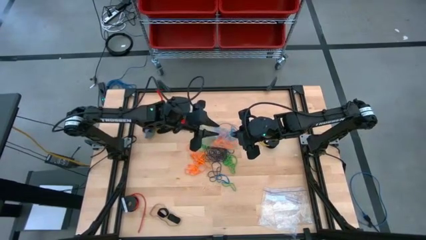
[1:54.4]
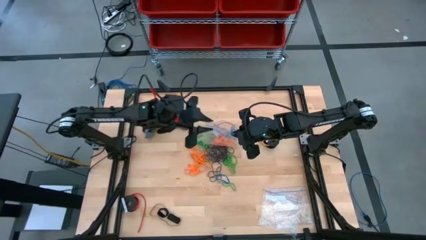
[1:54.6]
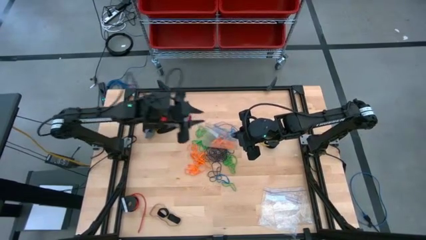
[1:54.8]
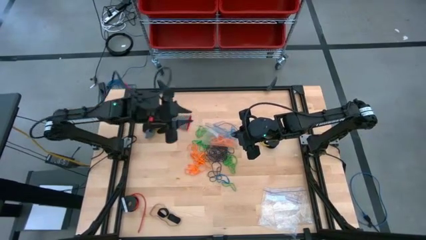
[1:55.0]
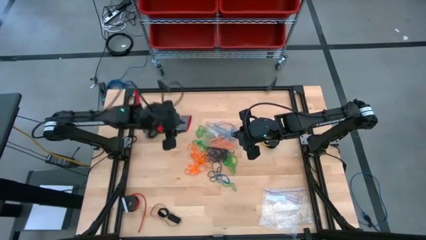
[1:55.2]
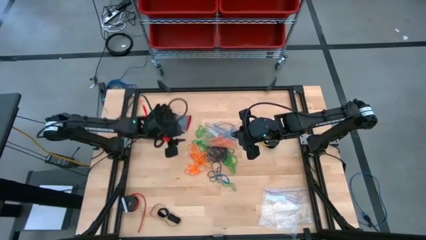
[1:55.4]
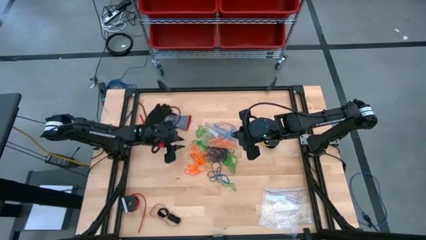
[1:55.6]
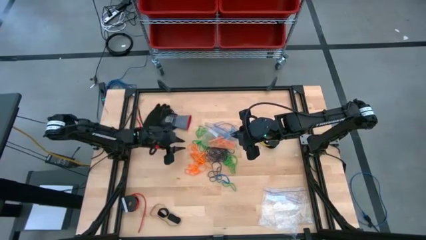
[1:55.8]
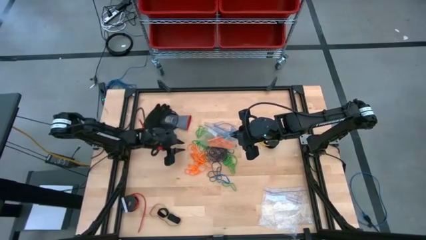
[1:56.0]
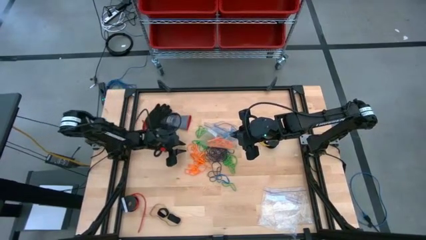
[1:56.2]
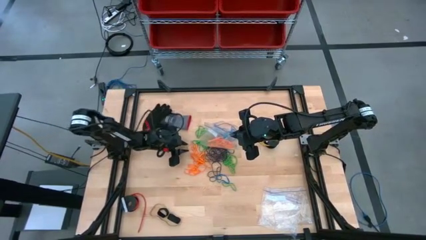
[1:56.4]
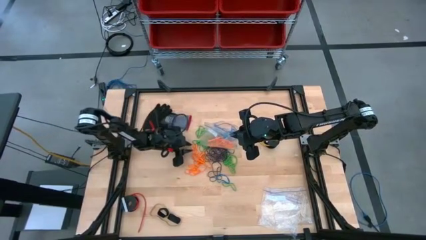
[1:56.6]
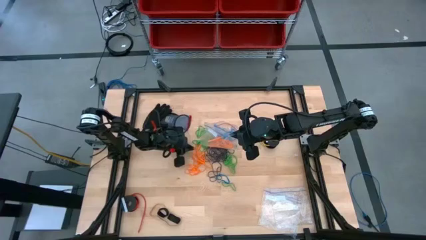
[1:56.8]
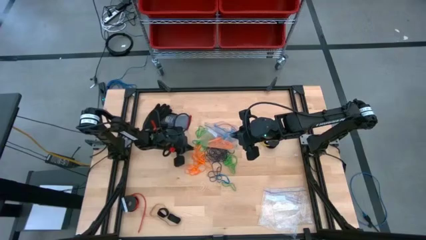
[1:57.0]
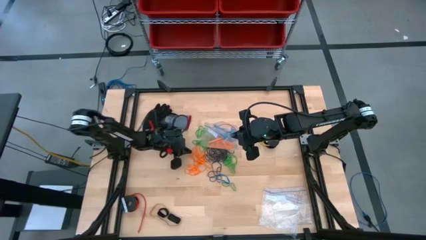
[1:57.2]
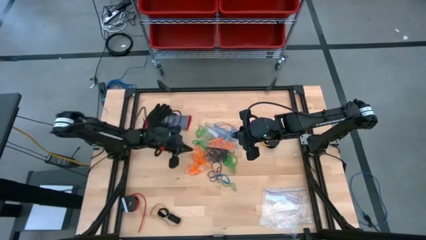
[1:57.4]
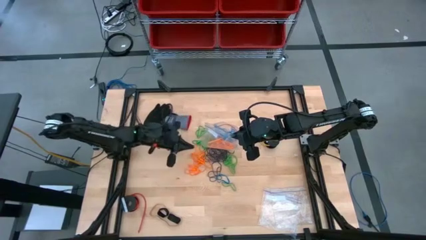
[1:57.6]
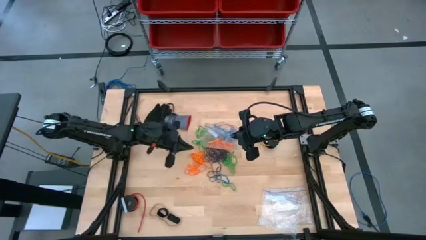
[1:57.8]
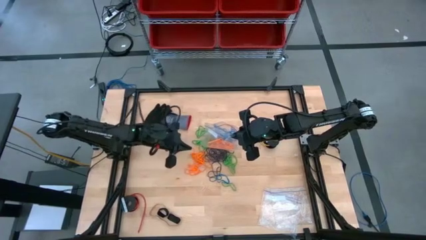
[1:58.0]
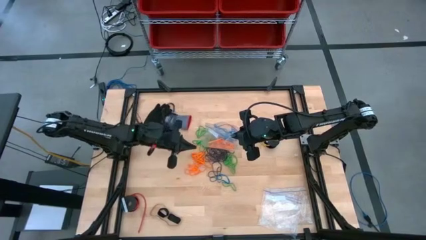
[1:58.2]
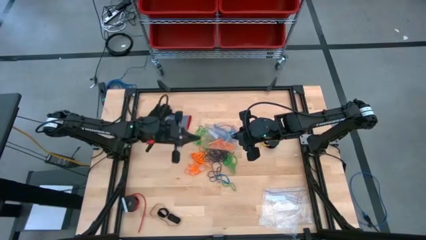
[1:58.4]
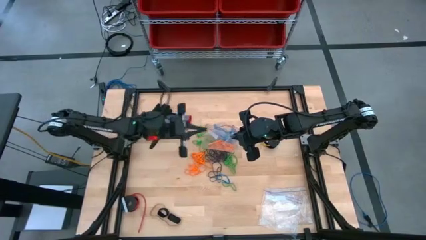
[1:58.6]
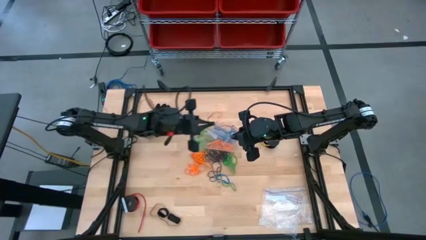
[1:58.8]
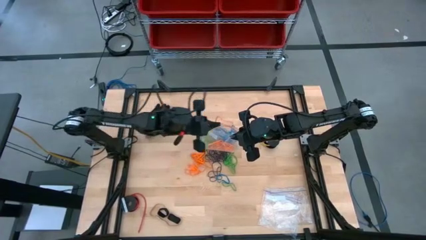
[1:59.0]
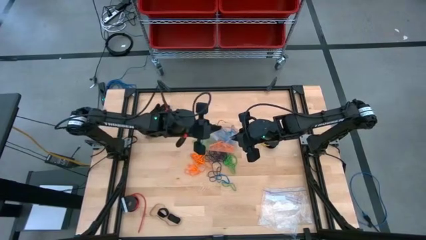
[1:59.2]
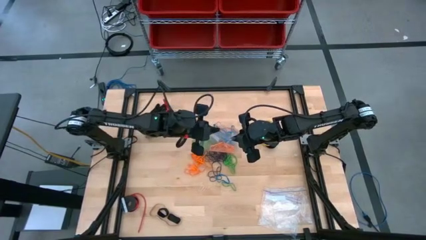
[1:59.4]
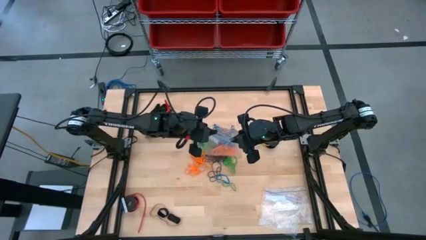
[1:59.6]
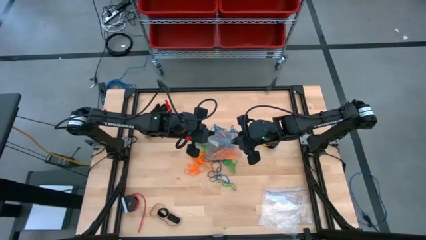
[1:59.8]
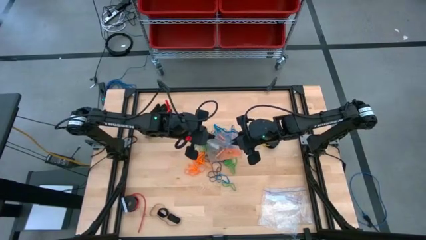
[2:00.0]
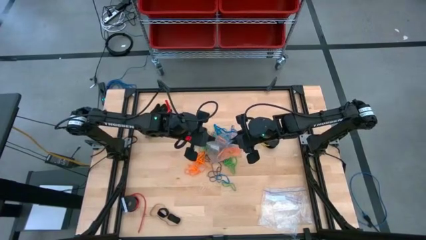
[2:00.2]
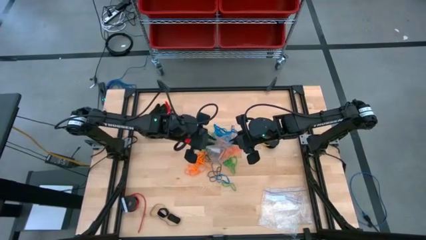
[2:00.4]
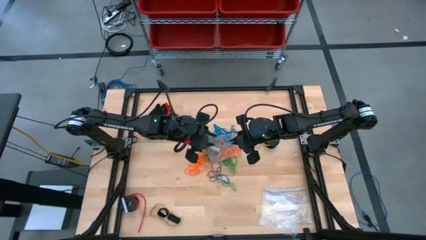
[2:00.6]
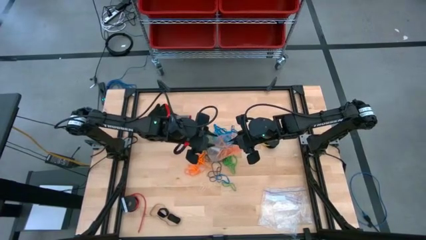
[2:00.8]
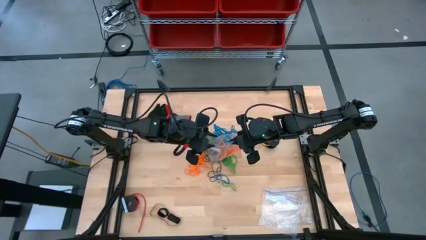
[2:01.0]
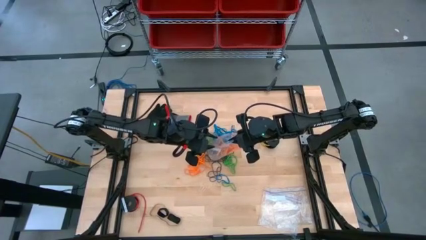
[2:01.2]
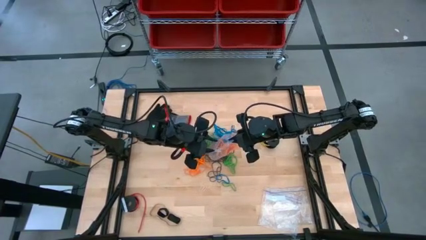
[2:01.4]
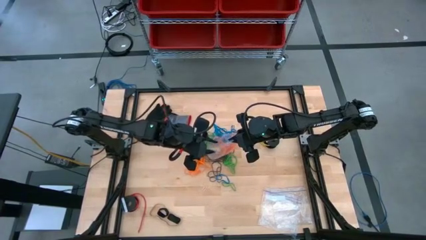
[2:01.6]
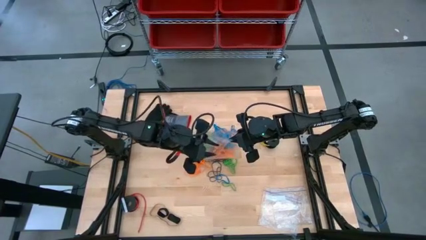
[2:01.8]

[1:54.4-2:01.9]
Task: Sort rubber bands
Put the orange rubber band into the transparent zip bag

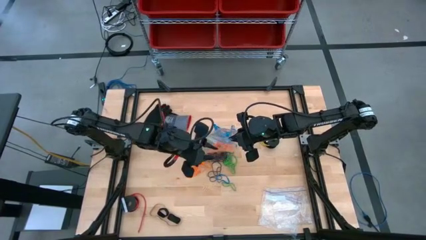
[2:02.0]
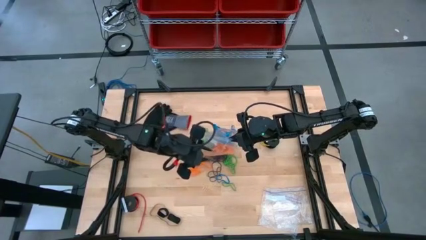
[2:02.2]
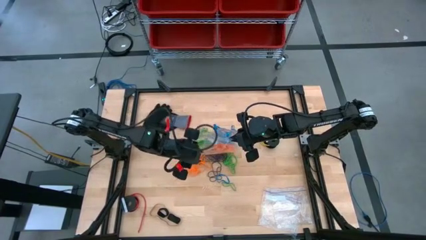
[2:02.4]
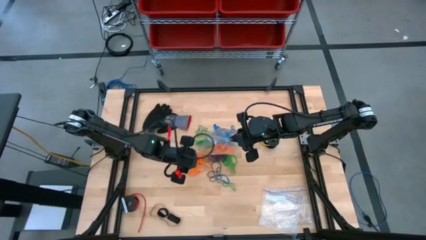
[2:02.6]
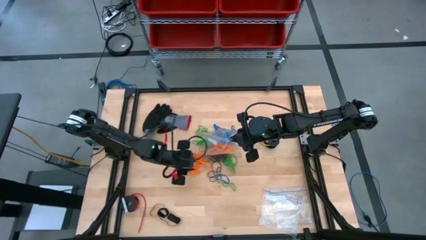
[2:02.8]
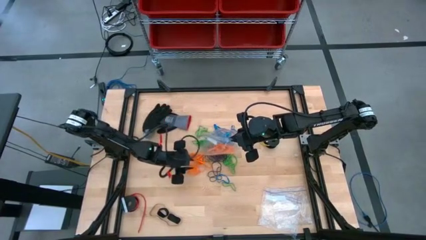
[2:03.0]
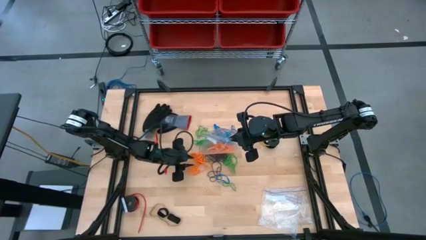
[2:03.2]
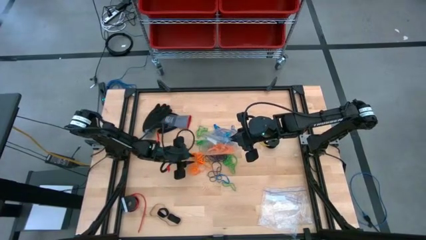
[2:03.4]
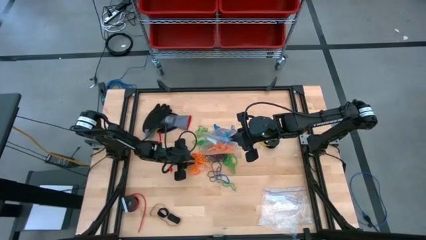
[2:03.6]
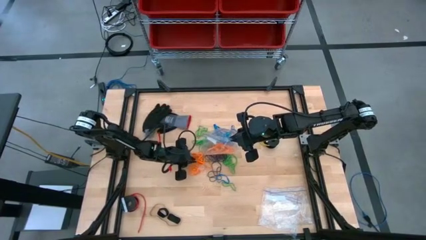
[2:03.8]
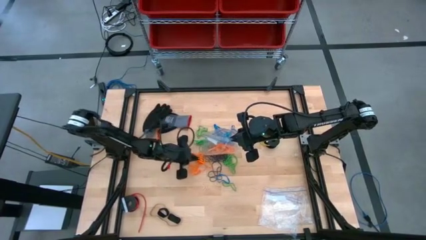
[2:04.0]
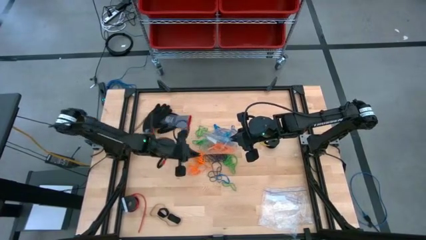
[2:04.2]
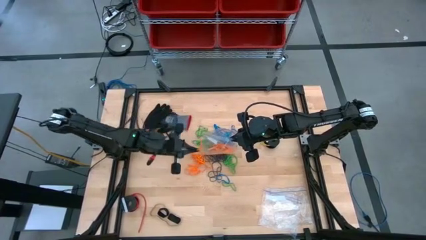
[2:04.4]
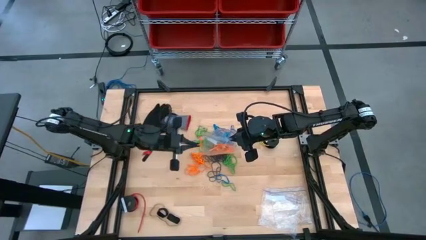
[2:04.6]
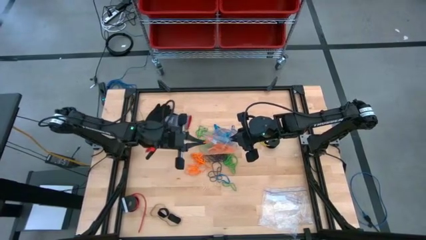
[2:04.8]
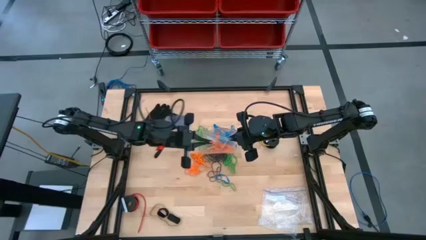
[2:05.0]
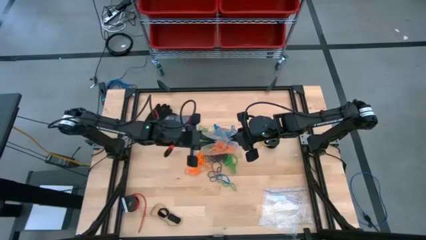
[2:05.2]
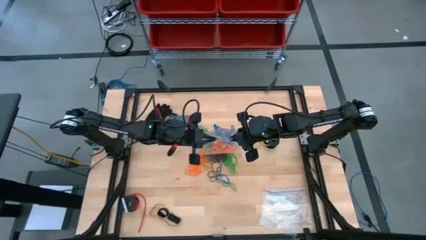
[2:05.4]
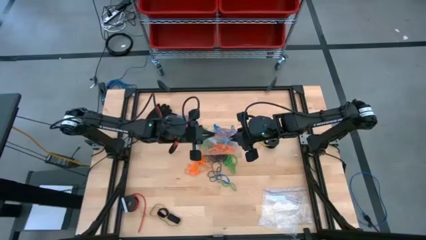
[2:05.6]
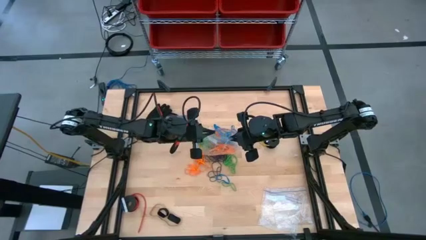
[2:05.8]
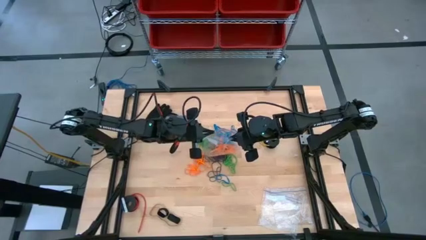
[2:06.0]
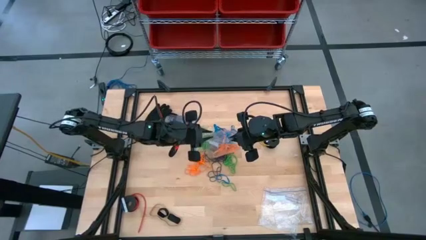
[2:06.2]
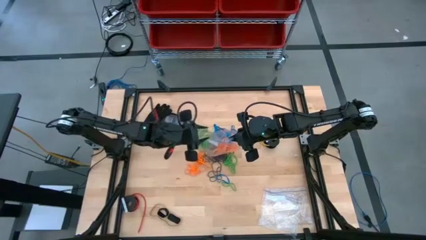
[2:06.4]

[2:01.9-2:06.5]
Put the orange rubber band into the transparent zip bag

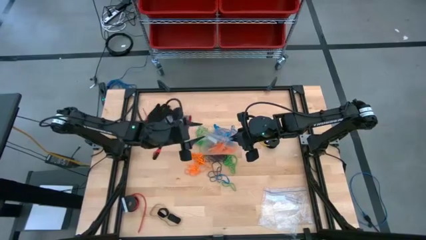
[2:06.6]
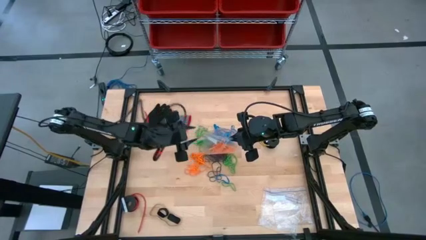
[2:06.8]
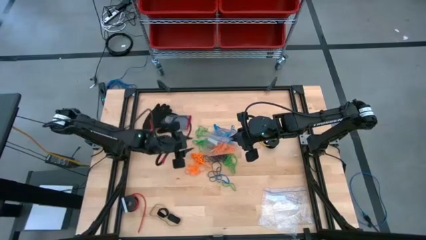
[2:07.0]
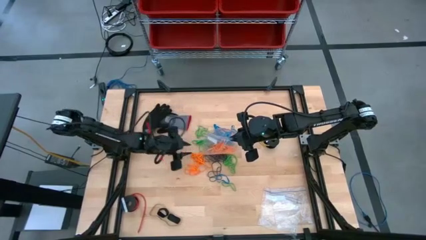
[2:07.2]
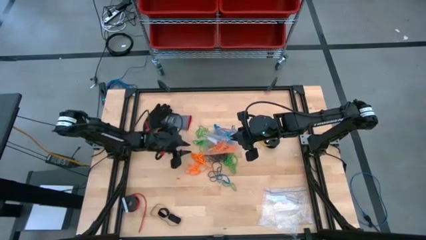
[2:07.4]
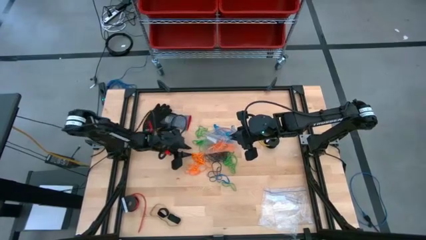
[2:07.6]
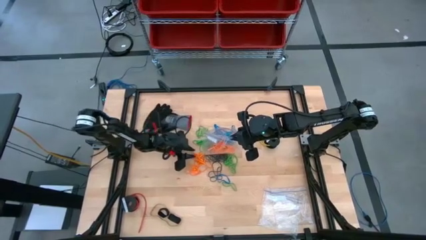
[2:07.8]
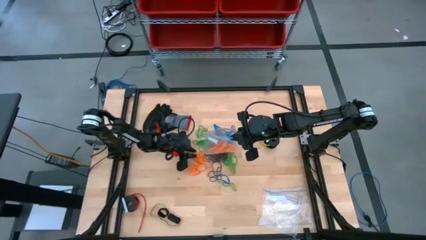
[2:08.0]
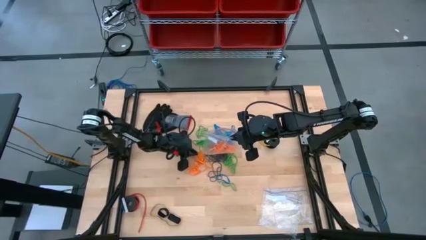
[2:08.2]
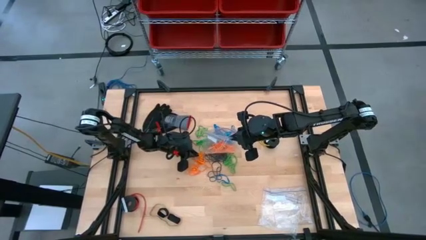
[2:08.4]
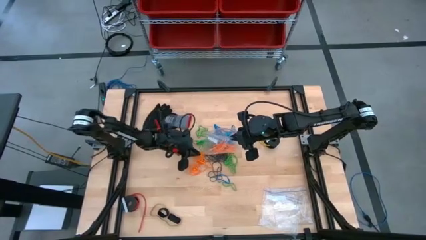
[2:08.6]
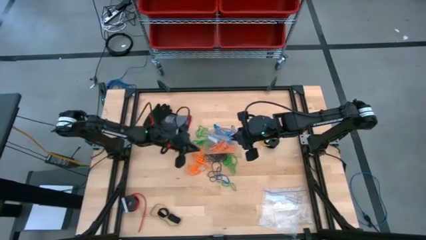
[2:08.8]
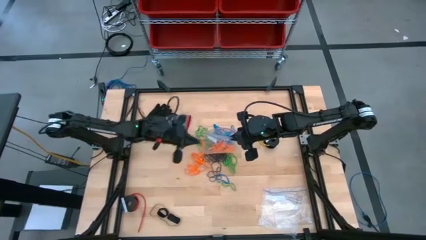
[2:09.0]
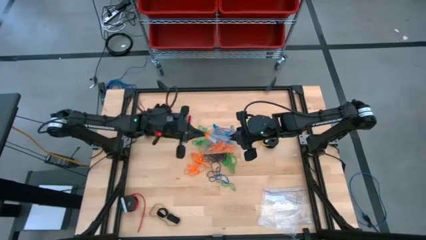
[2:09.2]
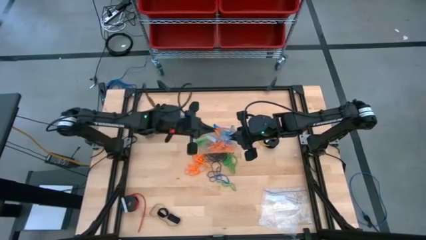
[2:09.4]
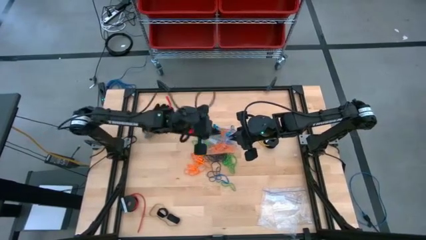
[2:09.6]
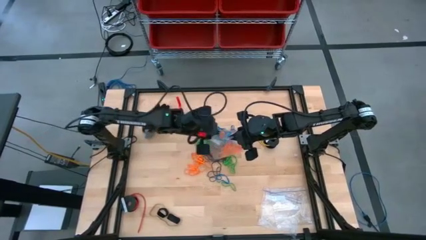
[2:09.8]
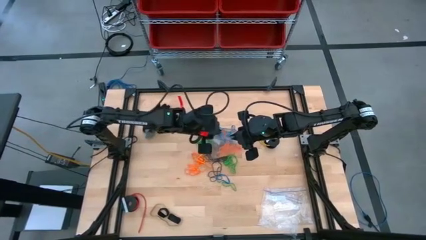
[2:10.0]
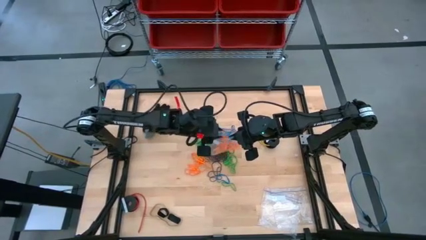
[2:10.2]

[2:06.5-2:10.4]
Put the orange rubber band into the transparent zip bag
